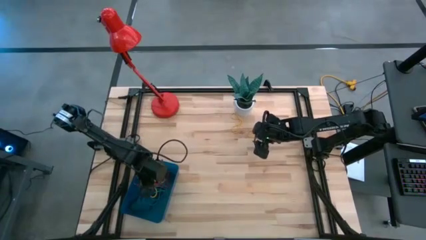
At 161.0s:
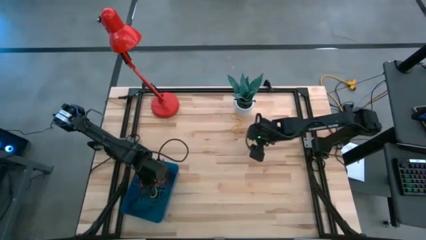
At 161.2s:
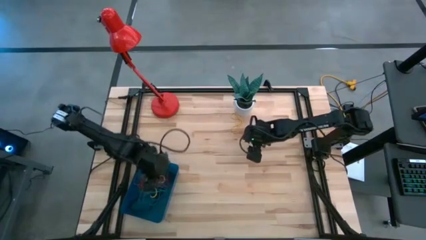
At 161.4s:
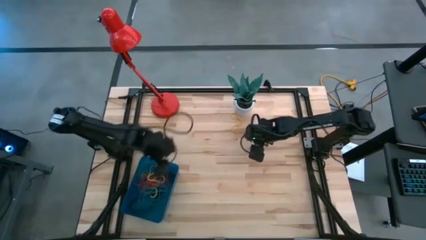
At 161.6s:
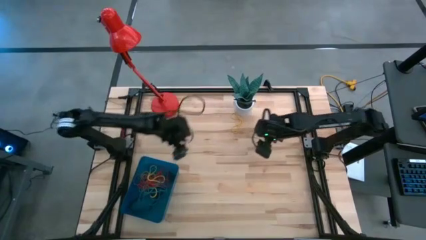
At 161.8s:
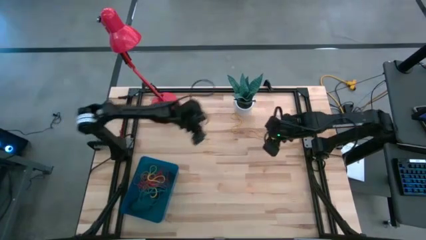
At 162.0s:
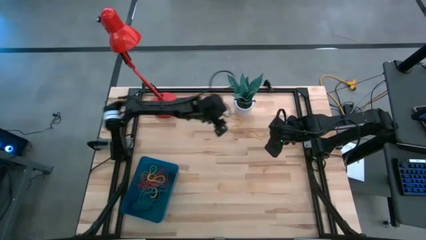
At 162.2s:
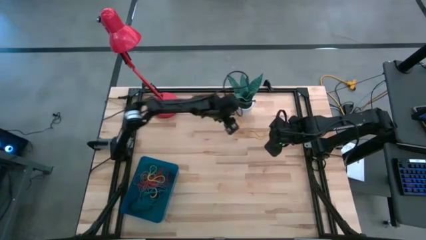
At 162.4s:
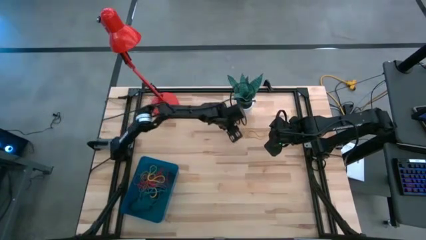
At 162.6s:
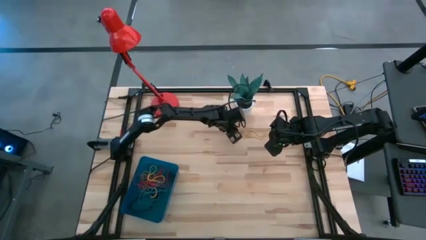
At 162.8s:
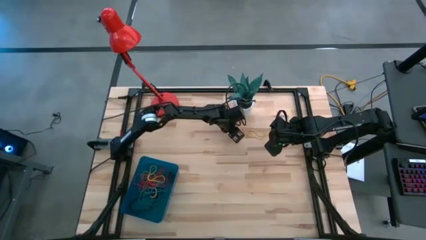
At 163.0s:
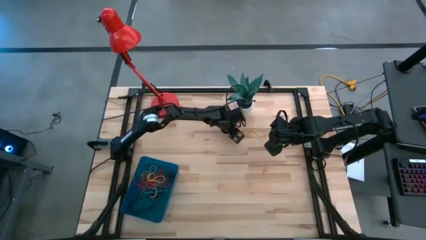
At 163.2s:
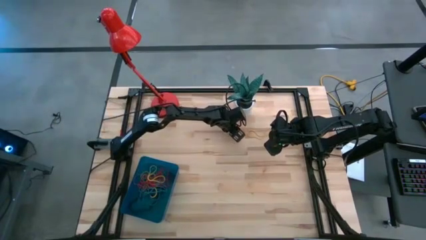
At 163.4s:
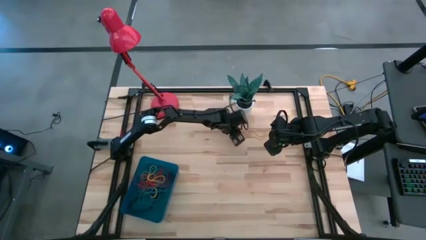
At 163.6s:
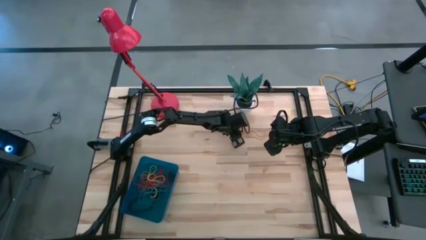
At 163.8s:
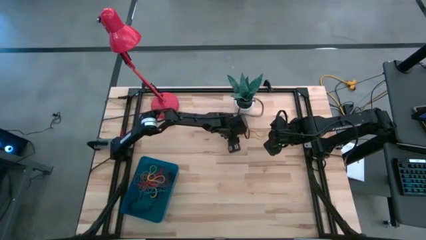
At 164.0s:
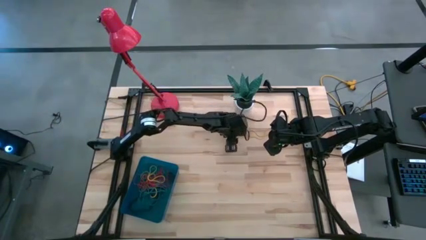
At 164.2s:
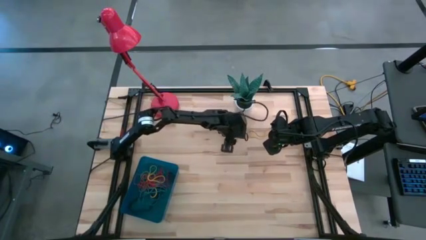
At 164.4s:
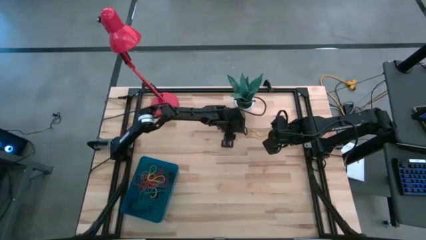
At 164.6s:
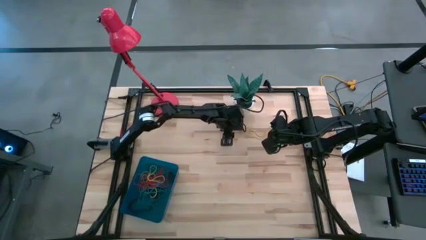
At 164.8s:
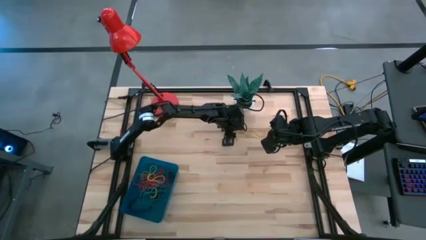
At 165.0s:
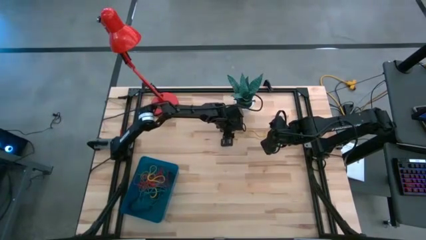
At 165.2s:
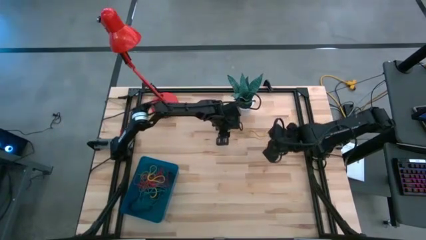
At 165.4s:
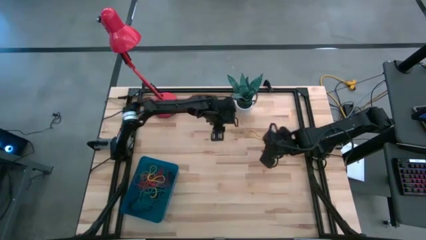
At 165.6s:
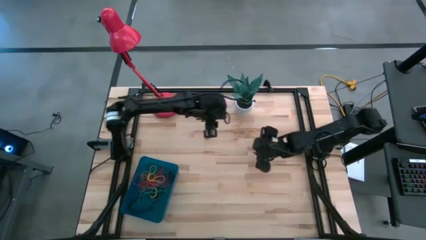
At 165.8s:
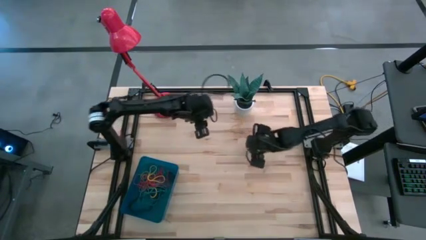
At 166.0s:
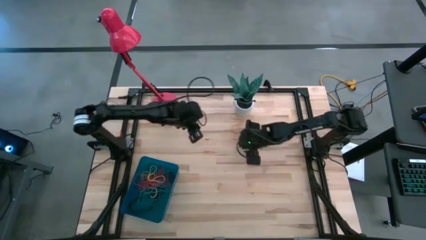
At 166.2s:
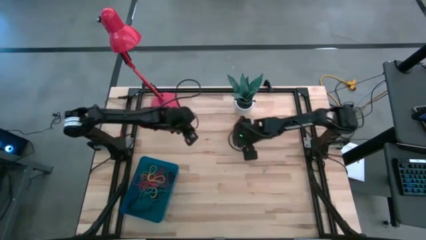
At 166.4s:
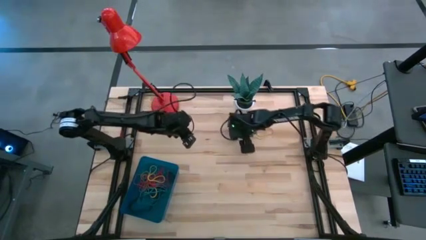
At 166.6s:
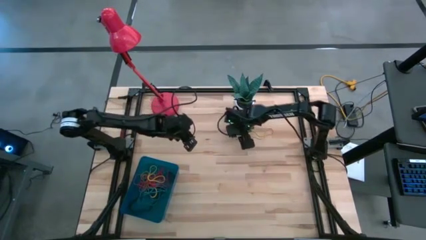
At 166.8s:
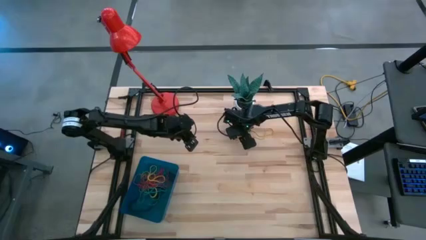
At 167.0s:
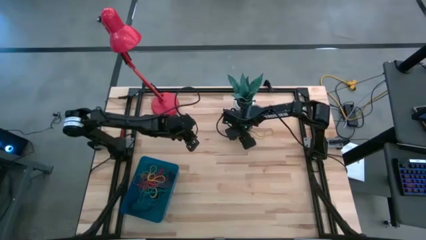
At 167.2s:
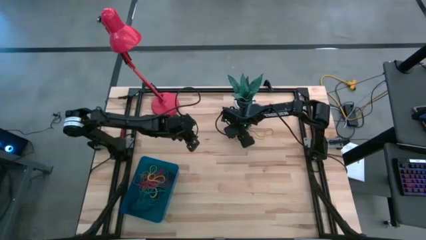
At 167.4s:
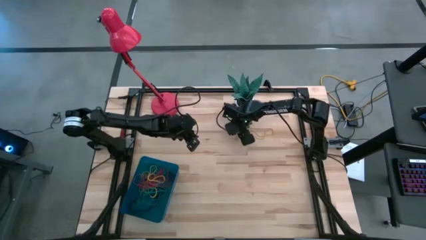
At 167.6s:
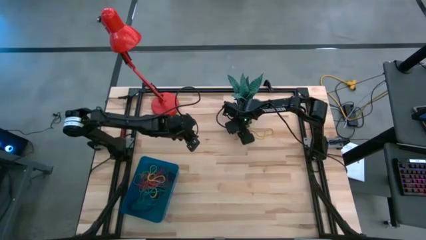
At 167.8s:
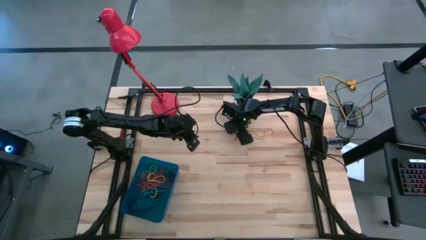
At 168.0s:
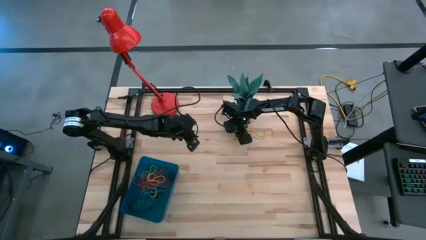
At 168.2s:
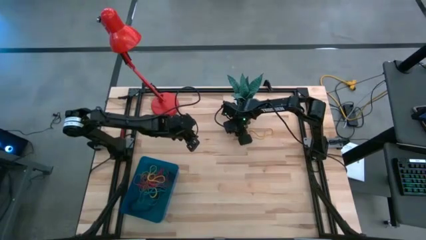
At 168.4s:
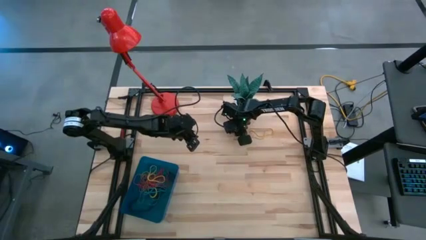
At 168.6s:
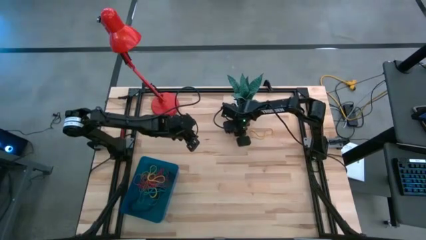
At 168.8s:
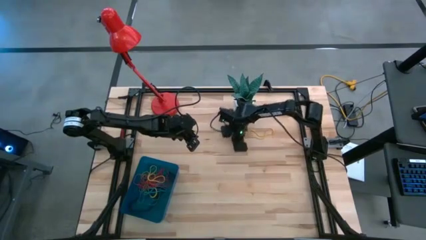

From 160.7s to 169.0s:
Task: Pick and place rubber bands into bin
Put the yellow rubber band into the blue bin

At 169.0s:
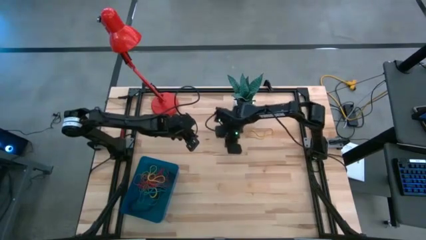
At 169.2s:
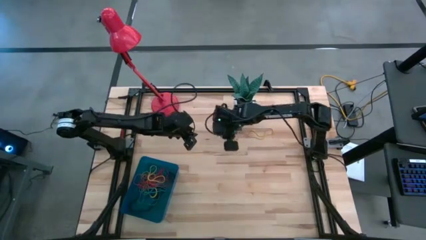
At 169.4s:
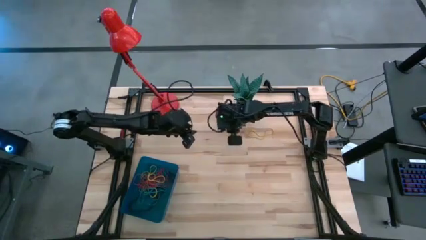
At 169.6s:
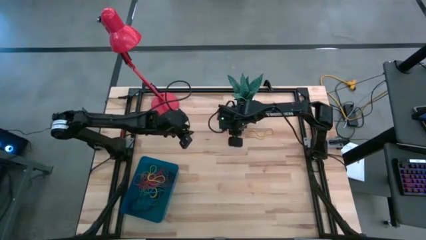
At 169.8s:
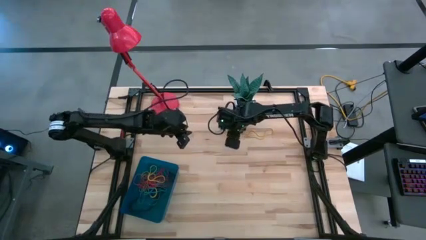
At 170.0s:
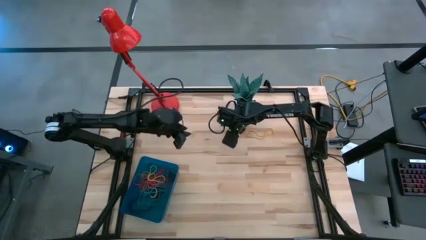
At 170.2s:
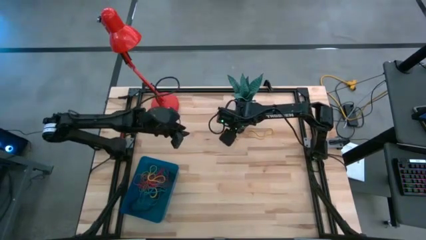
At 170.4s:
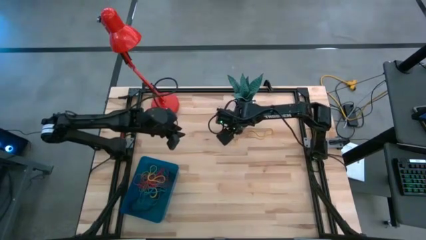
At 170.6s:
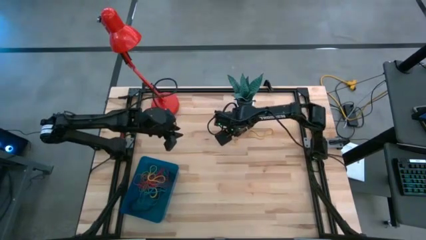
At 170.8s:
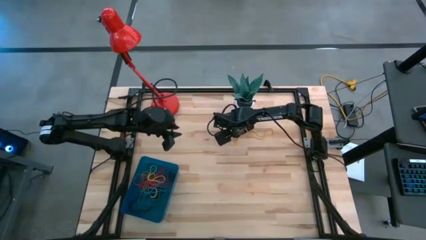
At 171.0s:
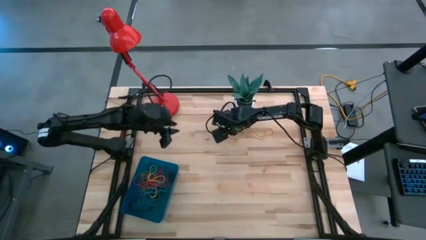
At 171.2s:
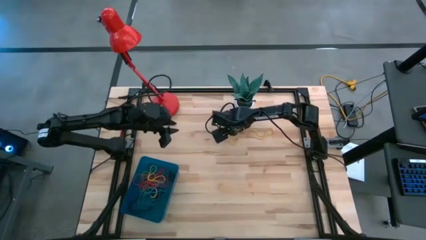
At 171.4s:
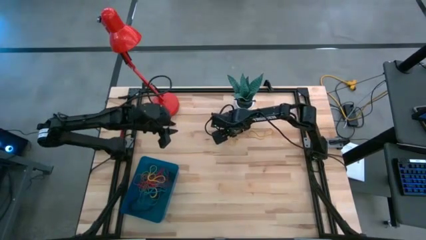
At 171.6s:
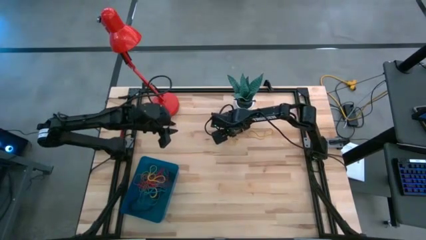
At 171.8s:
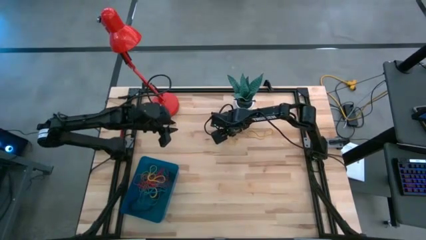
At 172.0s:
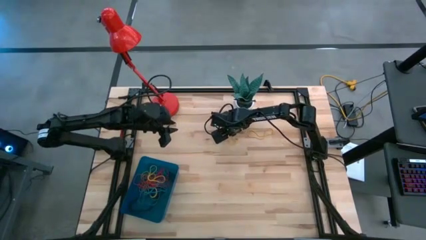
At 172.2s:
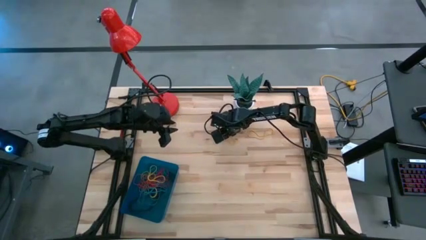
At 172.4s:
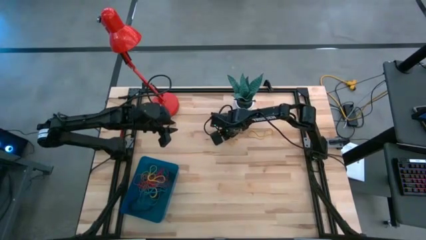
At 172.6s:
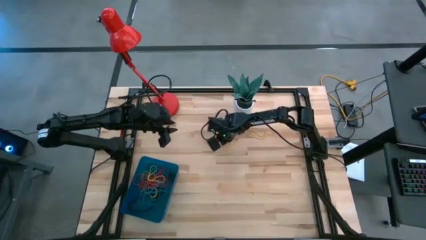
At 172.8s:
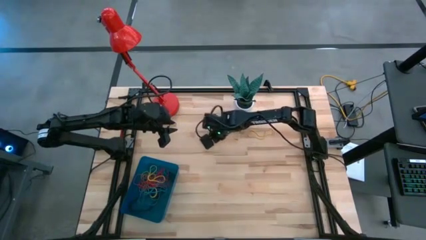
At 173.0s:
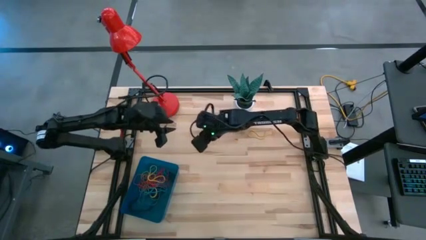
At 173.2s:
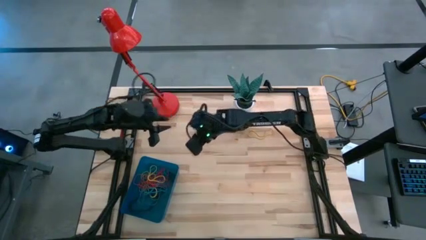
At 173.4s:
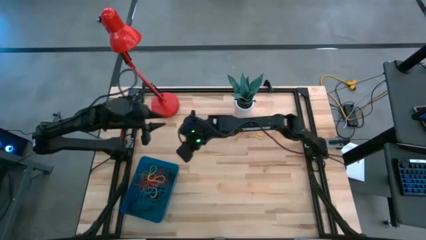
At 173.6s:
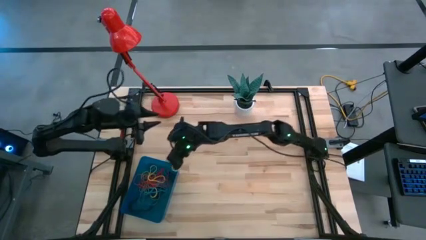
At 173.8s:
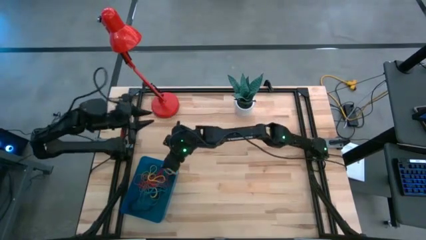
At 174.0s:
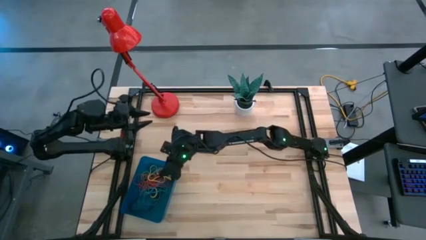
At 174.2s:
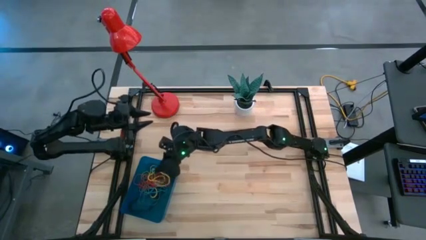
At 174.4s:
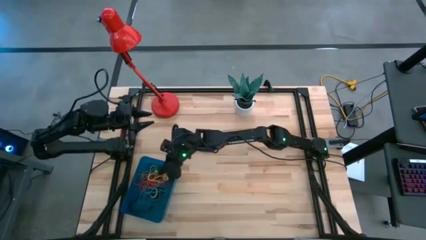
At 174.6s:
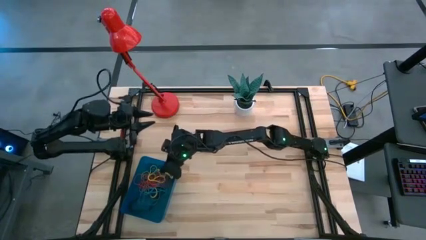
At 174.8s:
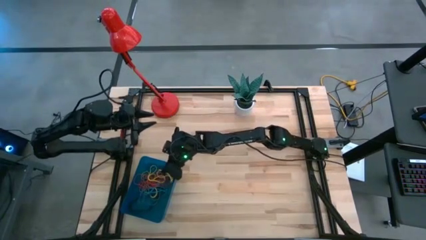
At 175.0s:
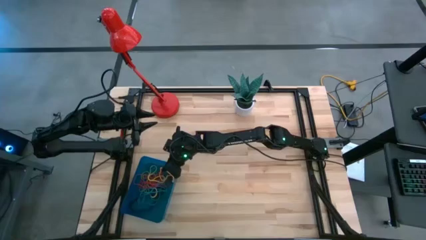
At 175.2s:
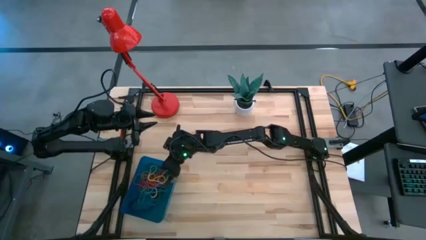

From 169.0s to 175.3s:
Put the yellow rubber band into the blue bin
